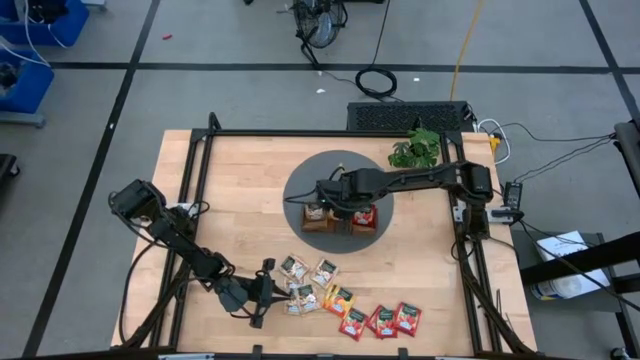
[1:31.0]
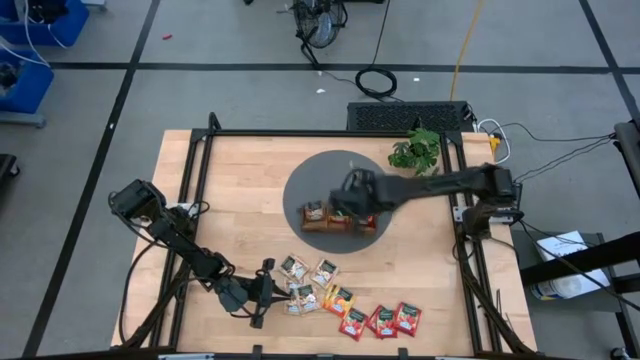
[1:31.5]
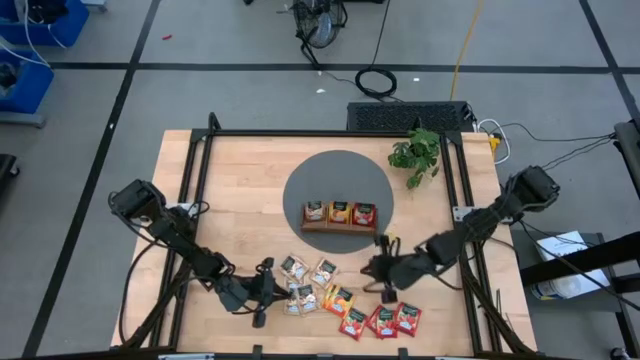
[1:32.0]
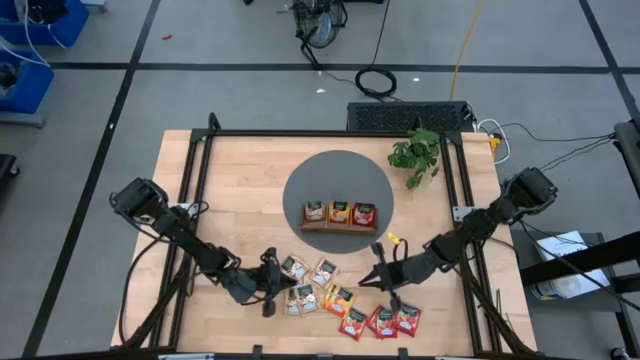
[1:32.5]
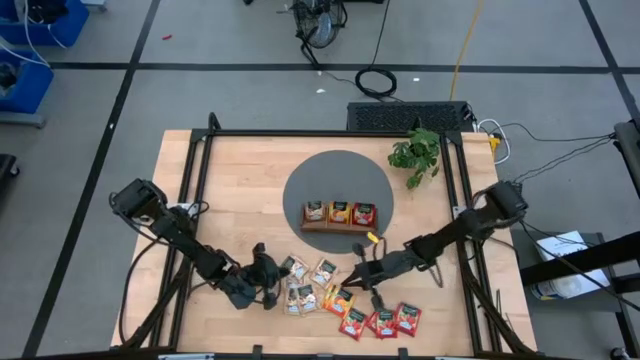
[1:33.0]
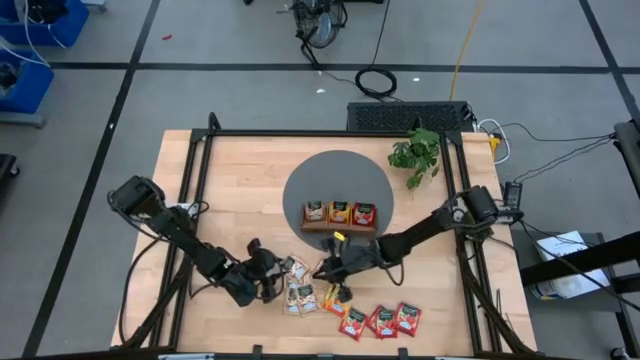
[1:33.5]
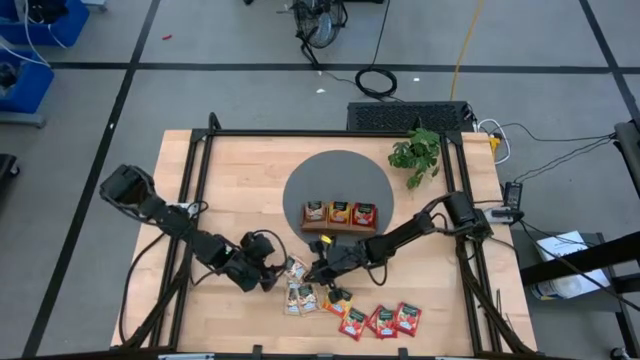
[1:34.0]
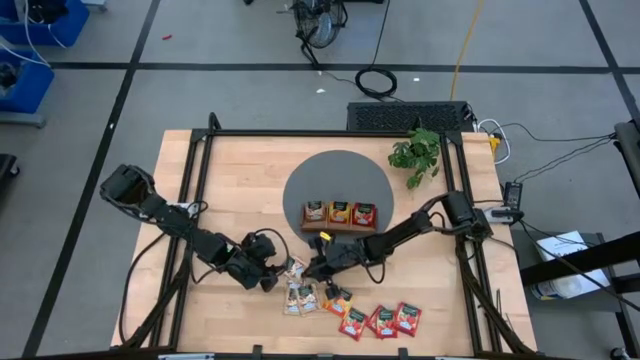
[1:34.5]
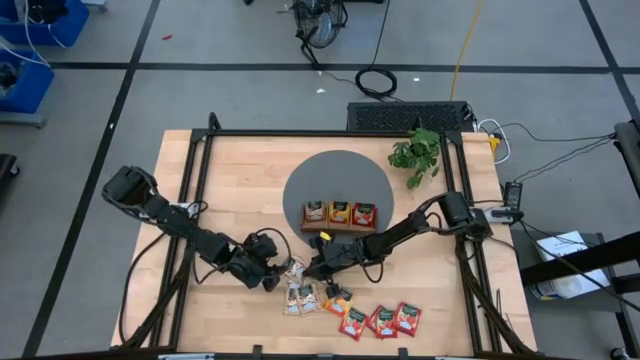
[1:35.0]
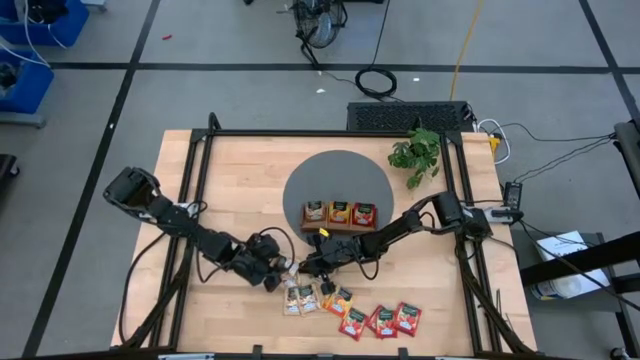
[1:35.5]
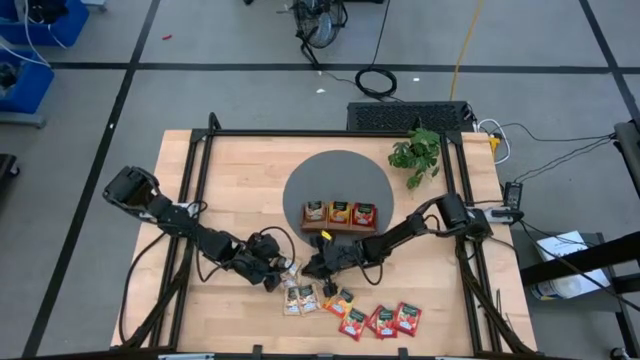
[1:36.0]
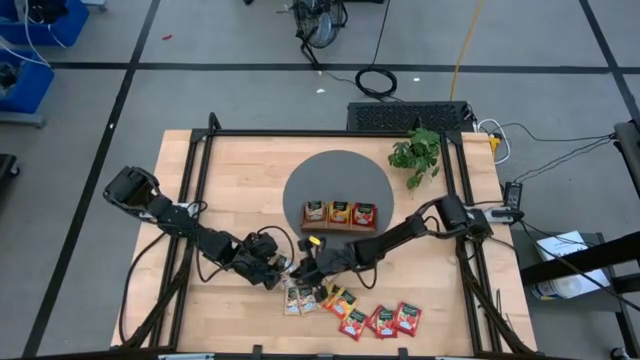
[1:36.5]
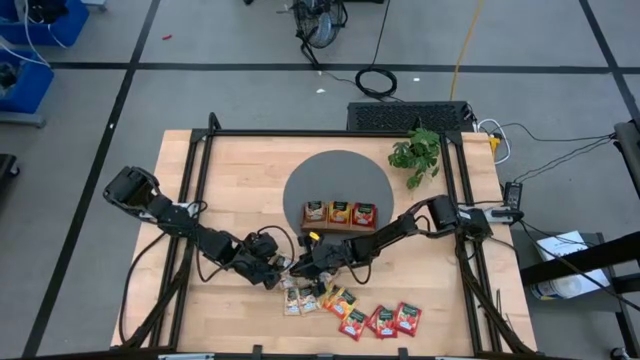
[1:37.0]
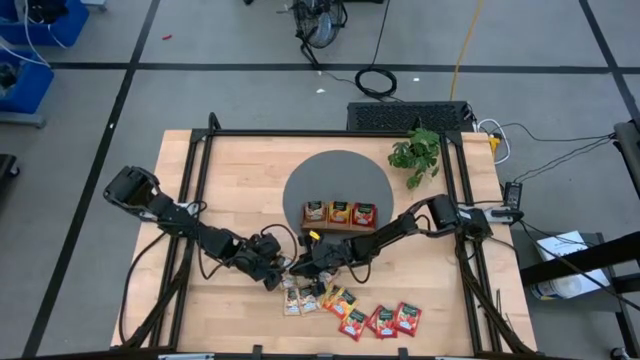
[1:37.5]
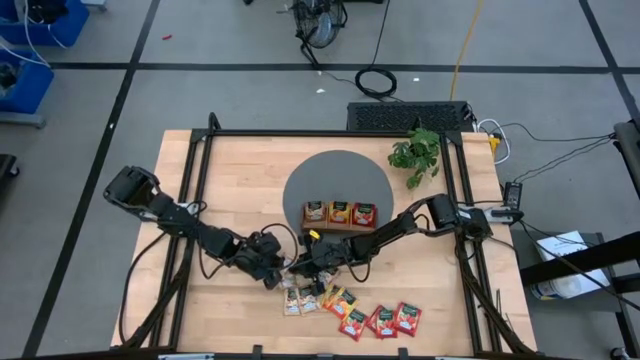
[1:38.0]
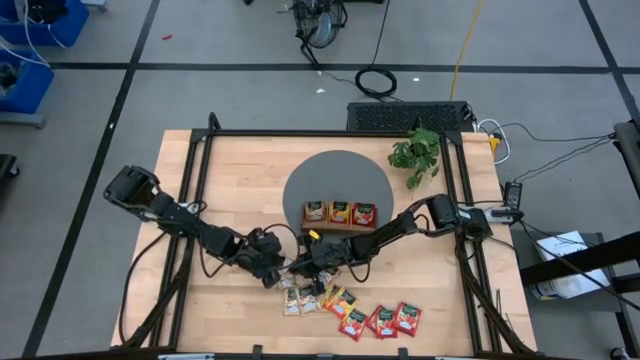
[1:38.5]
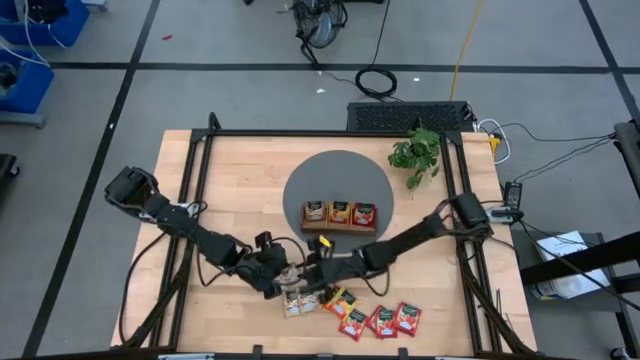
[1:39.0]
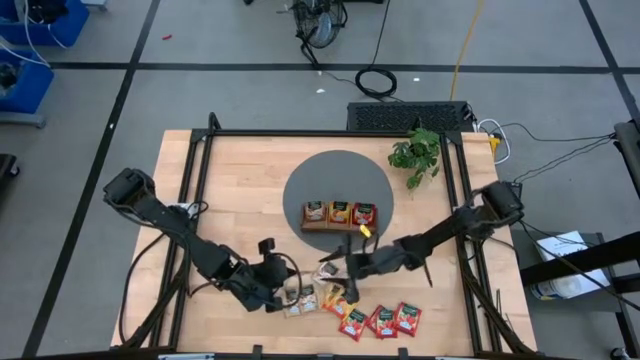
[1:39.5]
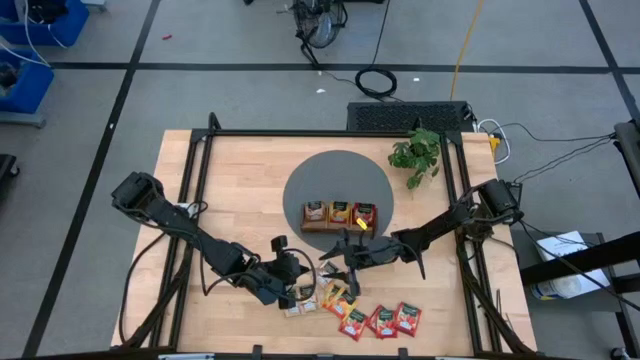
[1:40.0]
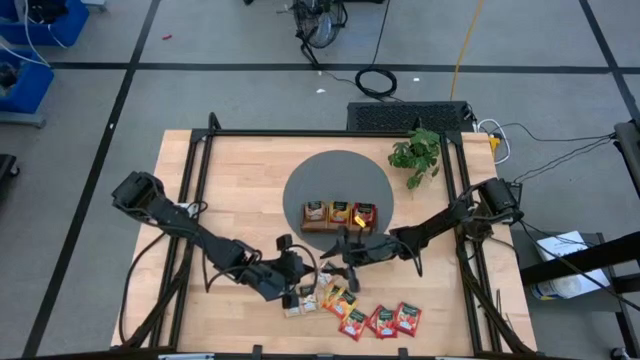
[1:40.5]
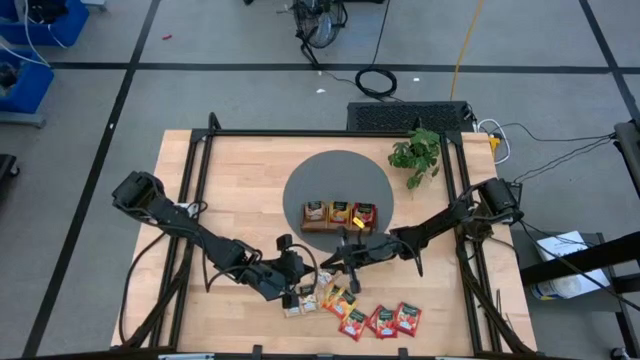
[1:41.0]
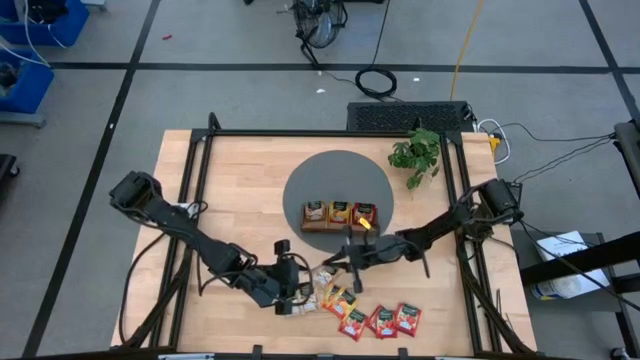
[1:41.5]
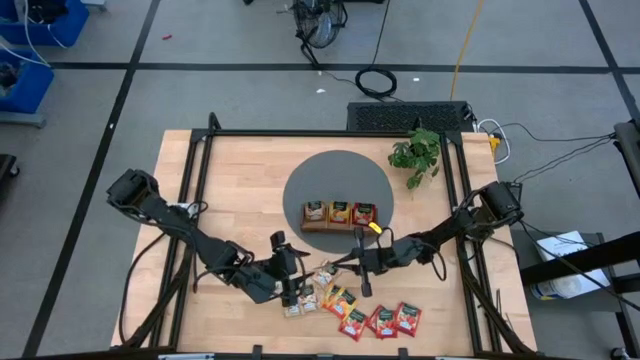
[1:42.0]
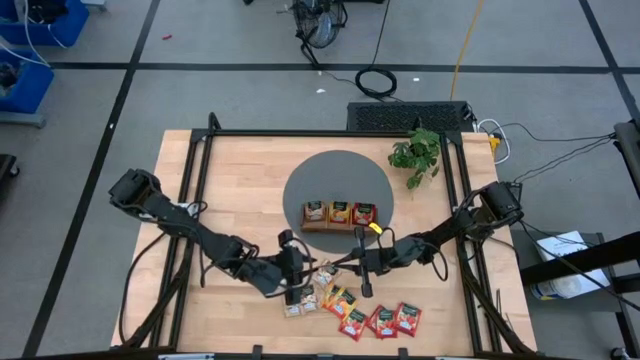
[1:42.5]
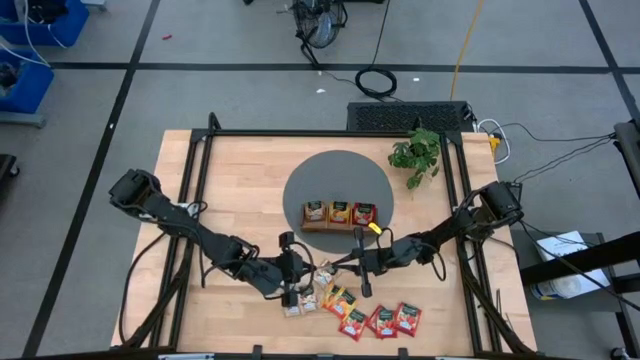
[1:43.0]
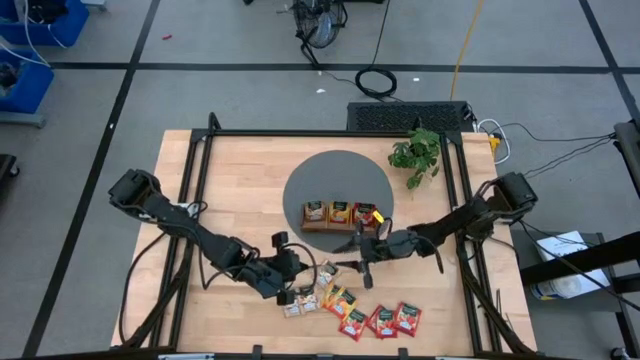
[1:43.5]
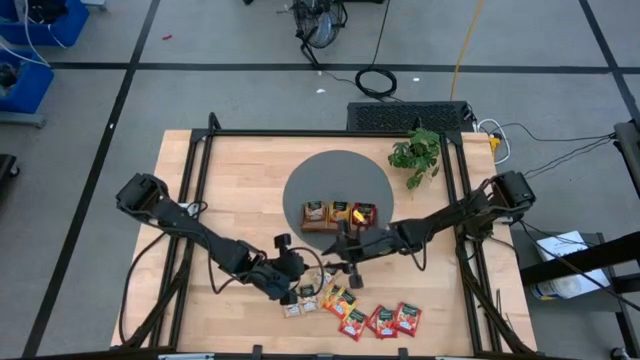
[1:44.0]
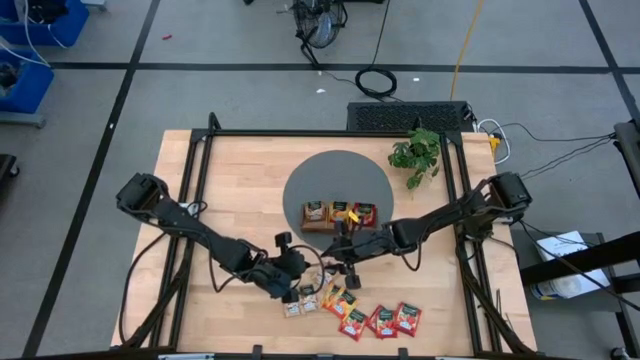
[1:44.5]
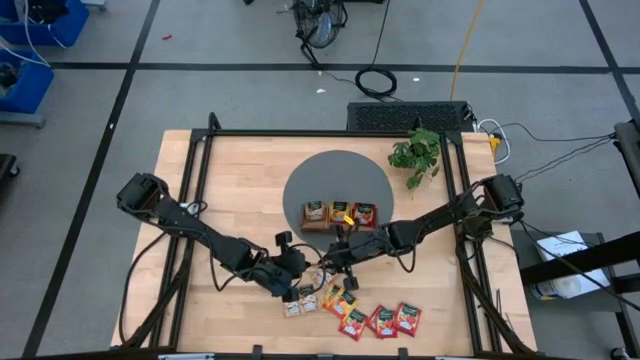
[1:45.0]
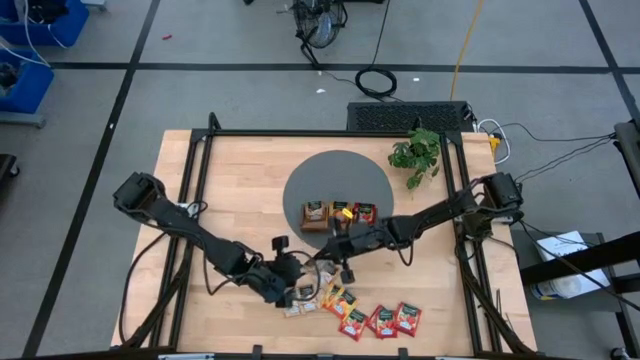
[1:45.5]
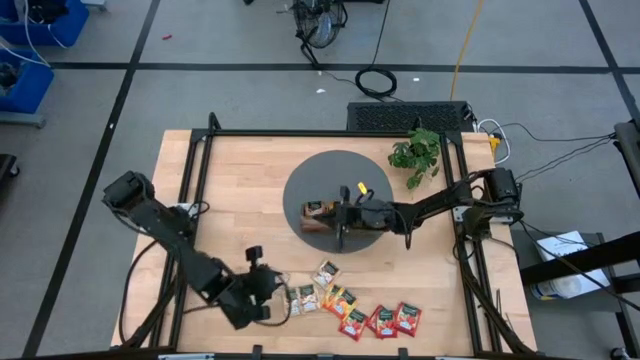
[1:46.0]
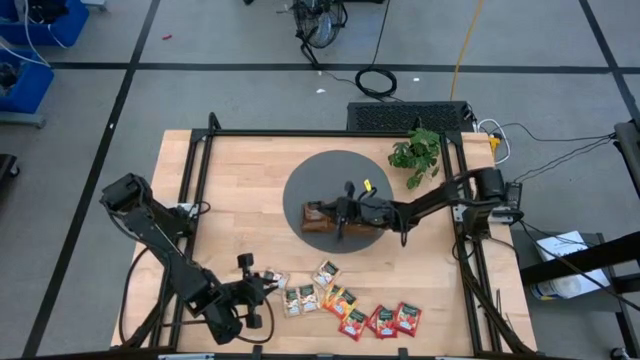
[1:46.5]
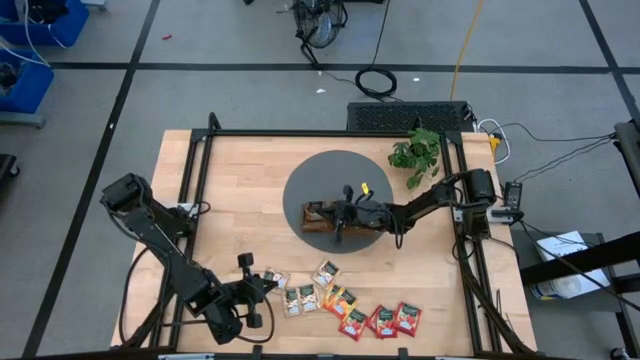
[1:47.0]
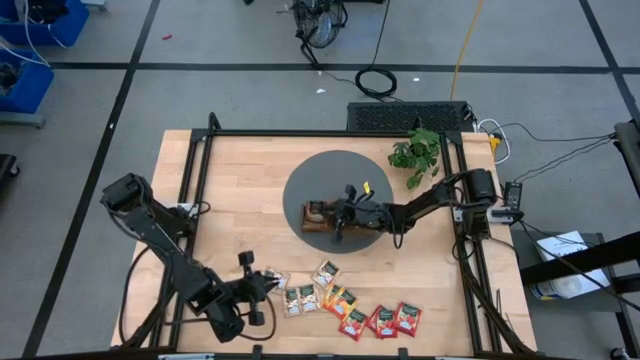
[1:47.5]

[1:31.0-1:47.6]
Task: Pick & Place Tea
Put the brown tea bag into the left slot of the wooden organizer

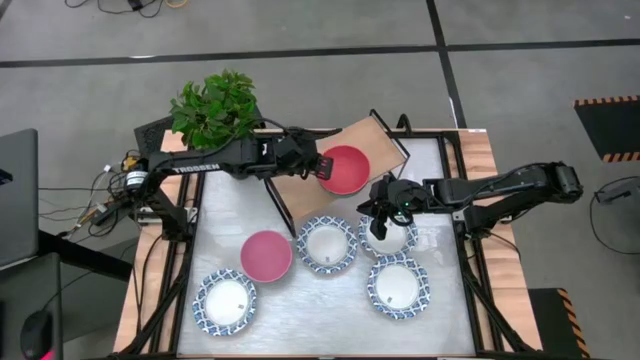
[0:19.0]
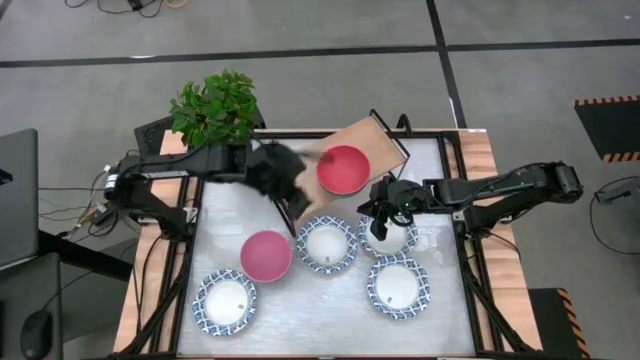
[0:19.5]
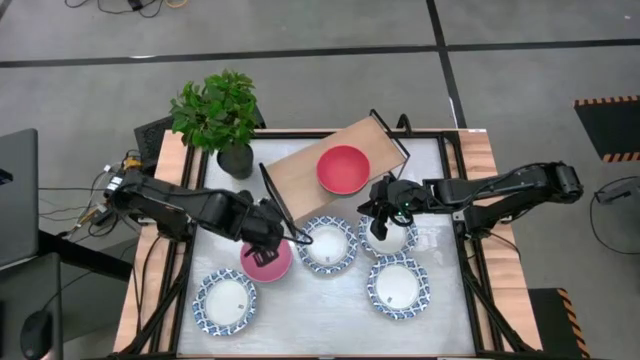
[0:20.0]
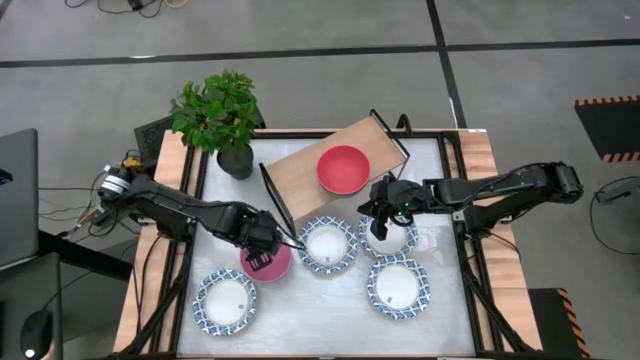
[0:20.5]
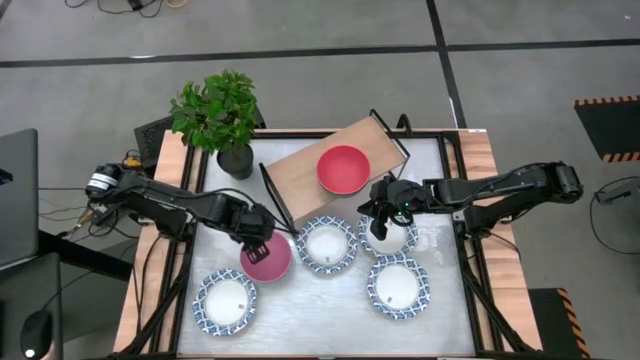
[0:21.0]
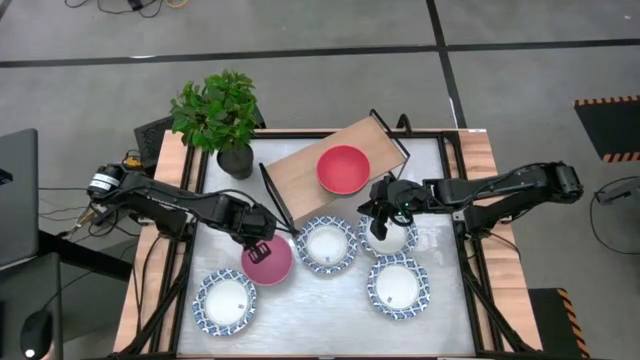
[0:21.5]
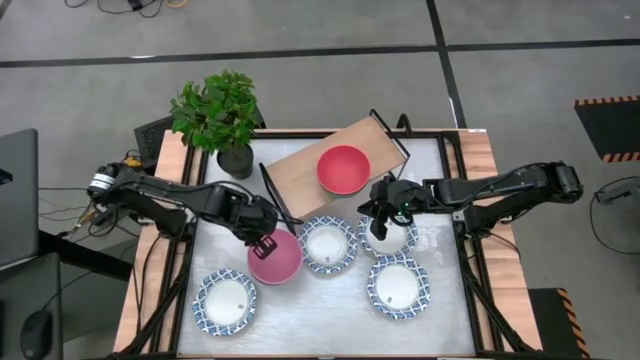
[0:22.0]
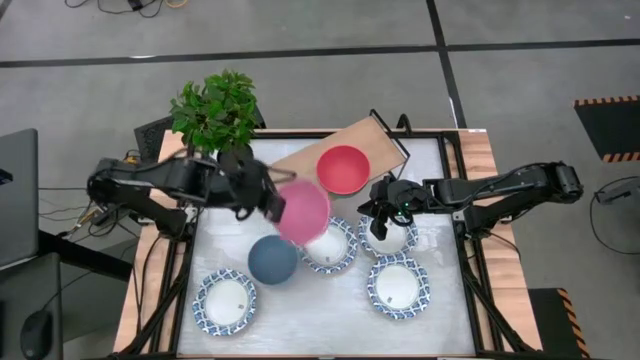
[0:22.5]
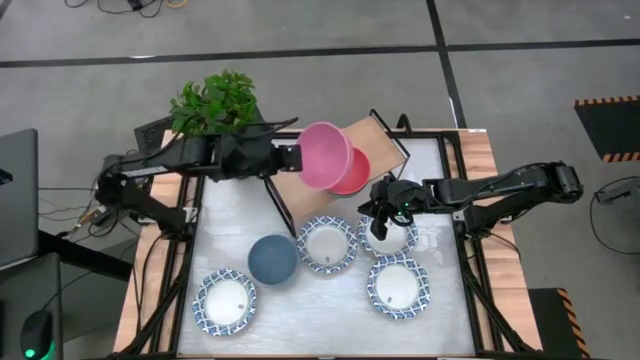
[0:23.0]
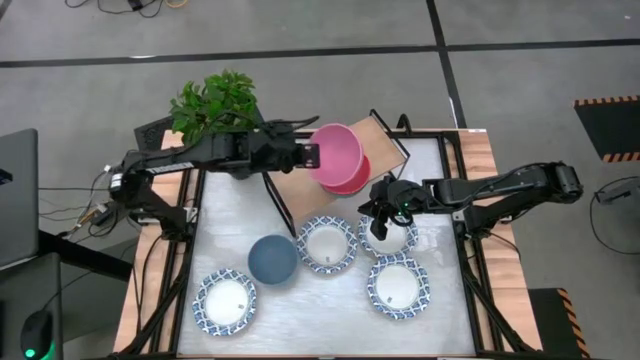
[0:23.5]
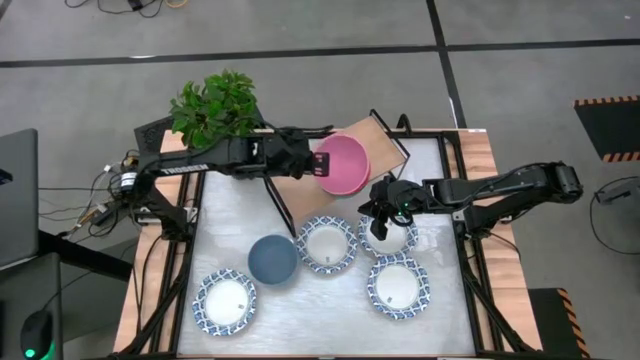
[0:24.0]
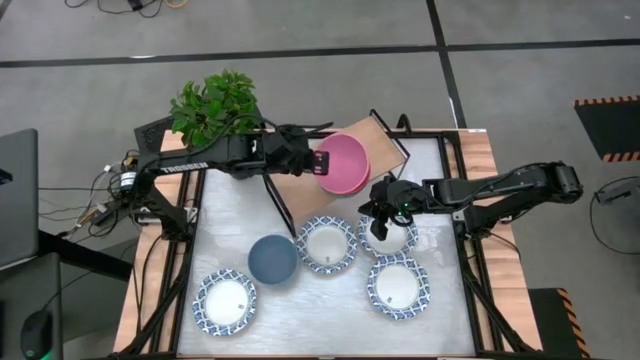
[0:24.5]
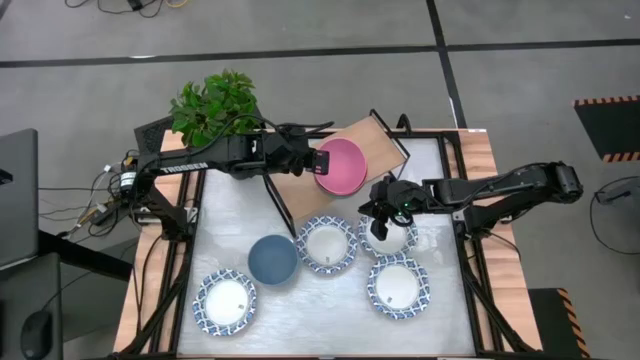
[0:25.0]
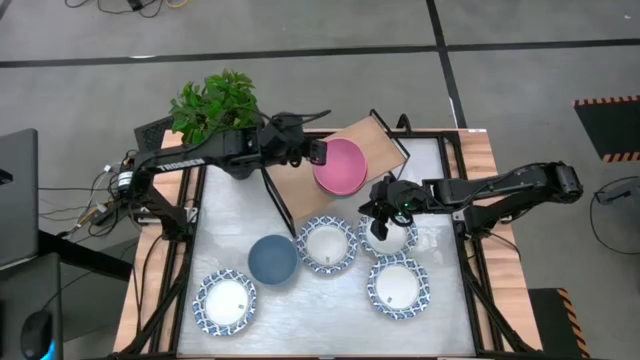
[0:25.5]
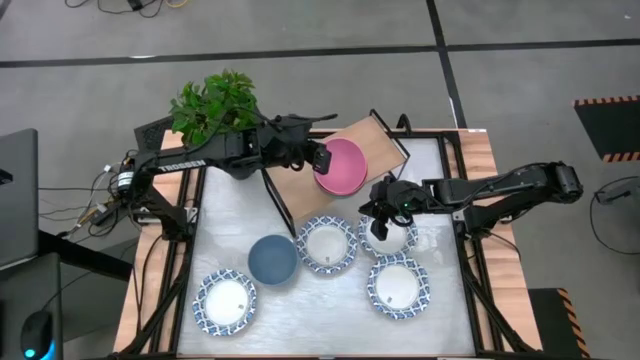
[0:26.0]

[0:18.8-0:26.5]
Task: Place and stack bowls onto a shelf
Stack the pink bowl on the orange bowl on the shelf
